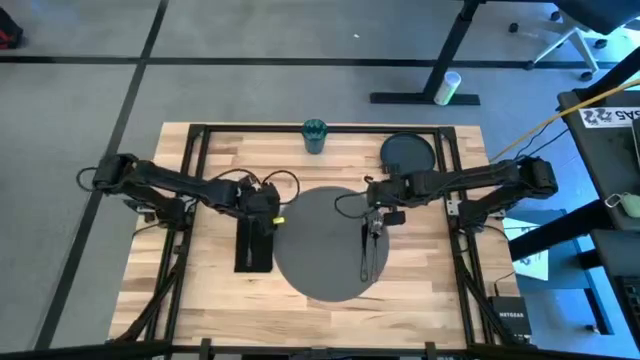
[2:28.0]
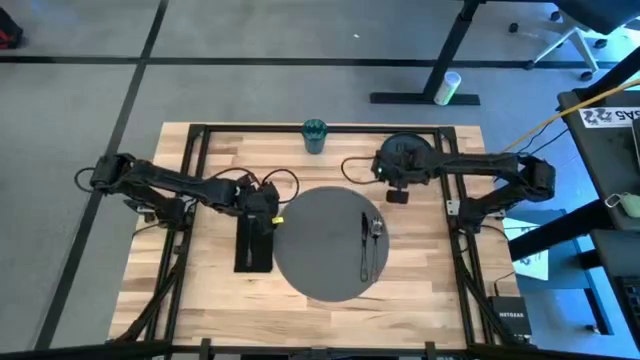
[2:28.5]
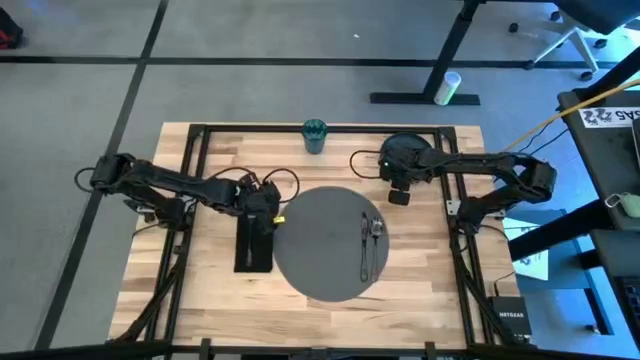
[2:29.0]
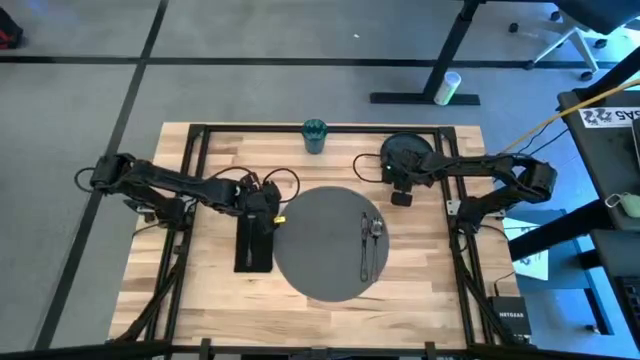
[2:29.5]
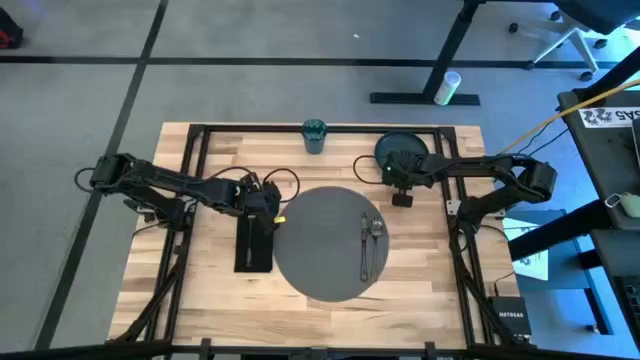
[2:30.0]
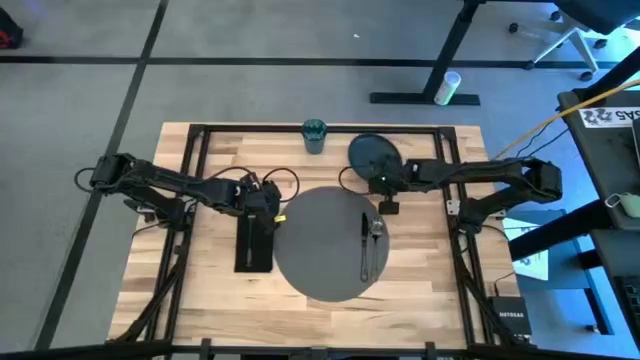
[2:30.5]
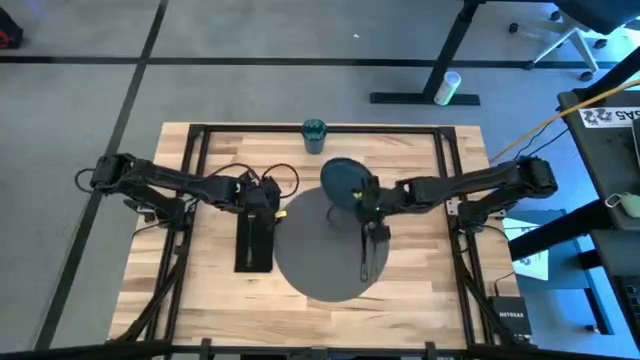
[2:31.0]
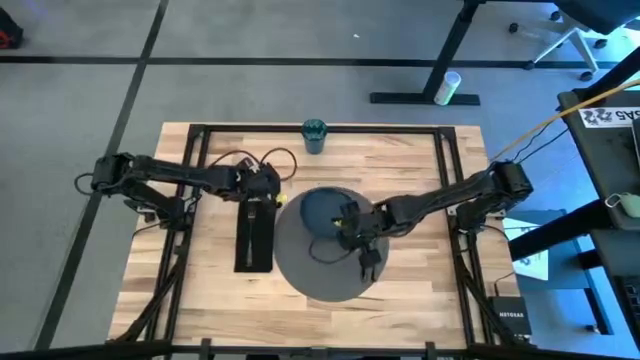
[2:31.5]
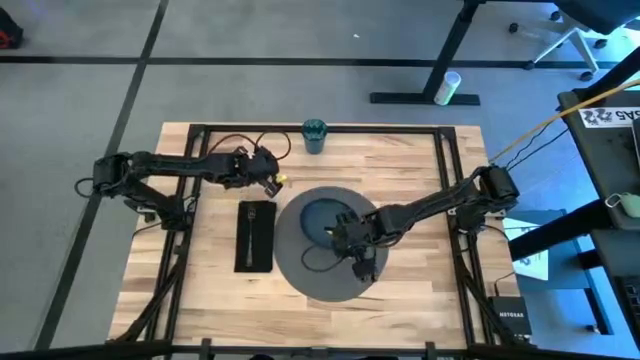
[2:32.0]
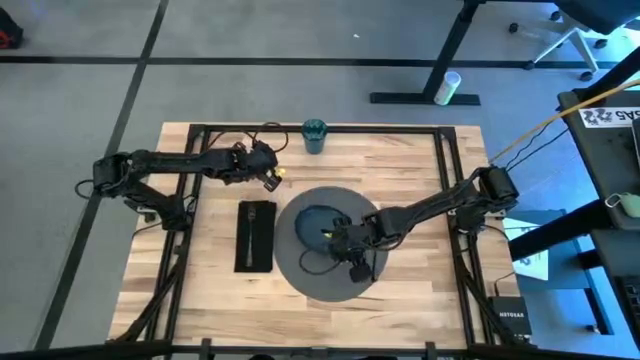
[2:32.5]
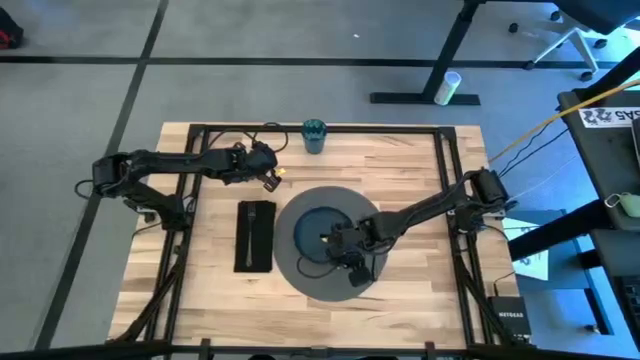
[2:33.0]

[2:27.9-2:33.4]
Task: Set table place
Put the black plate on the black table mat

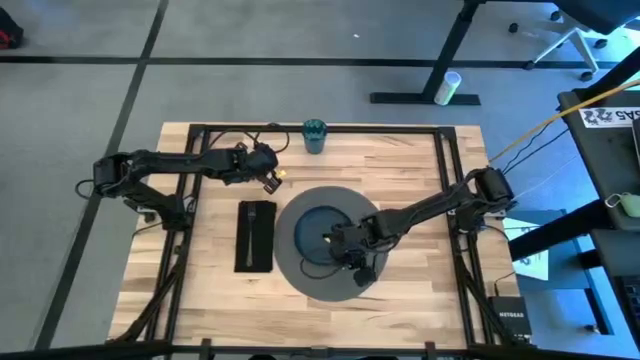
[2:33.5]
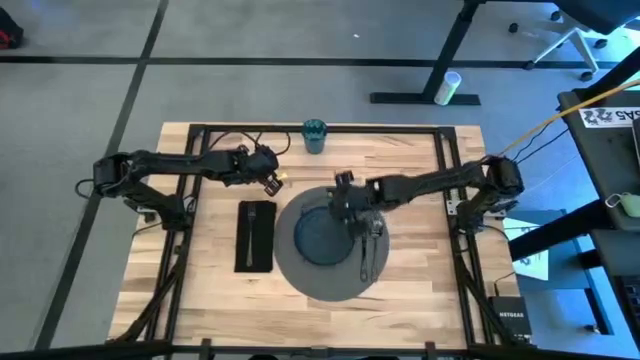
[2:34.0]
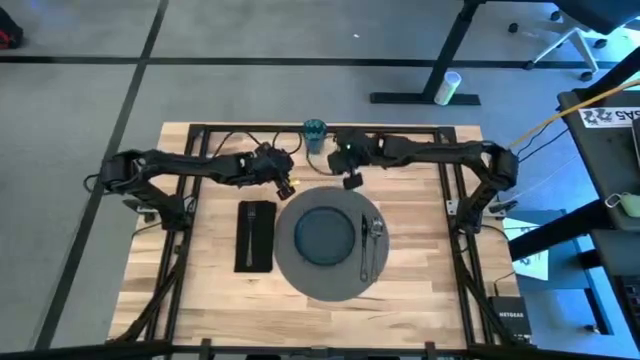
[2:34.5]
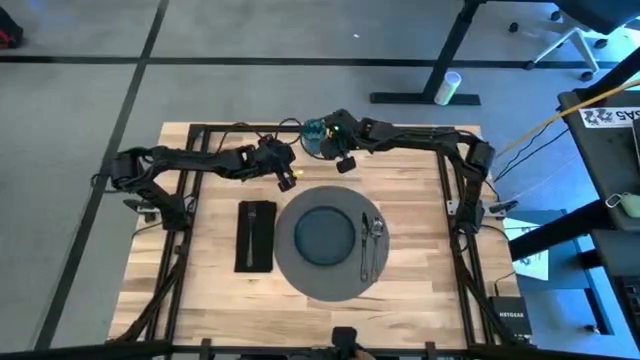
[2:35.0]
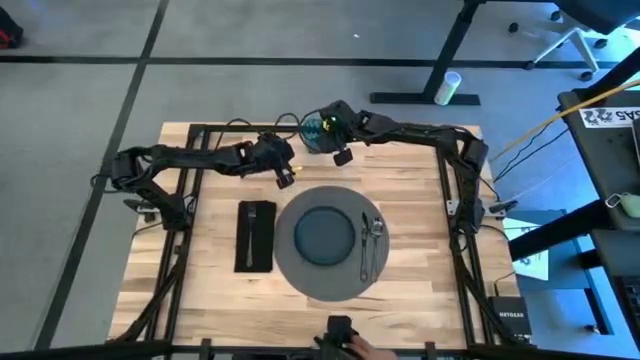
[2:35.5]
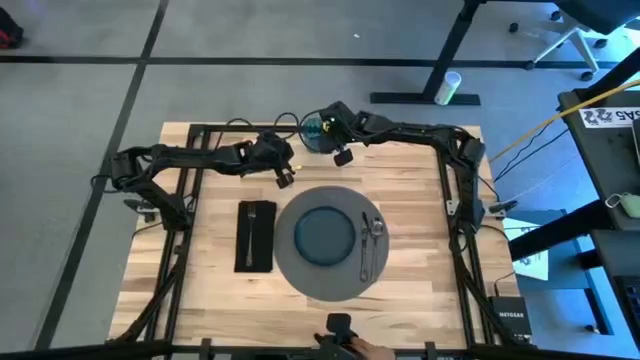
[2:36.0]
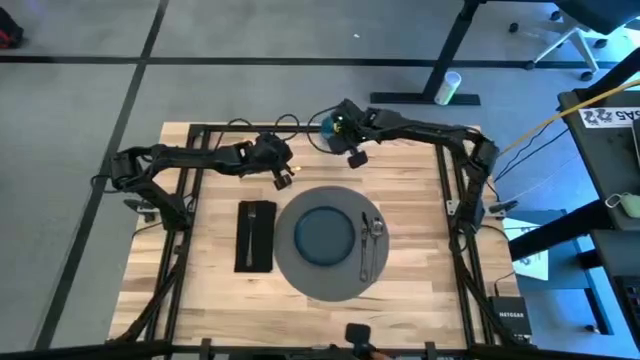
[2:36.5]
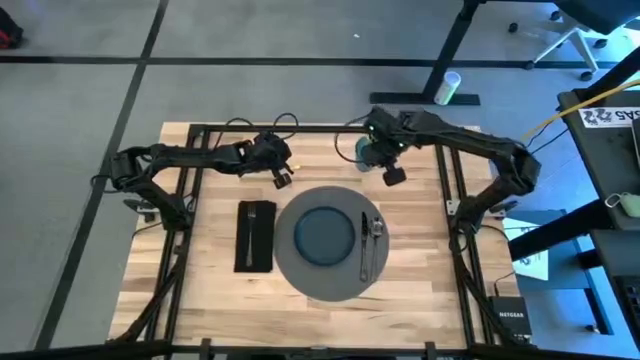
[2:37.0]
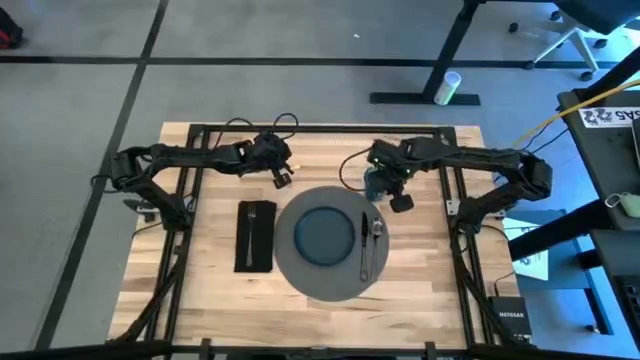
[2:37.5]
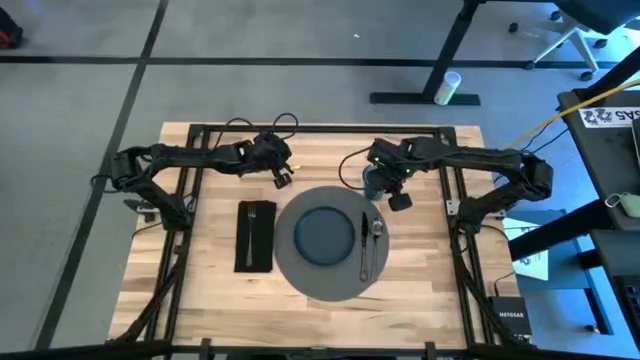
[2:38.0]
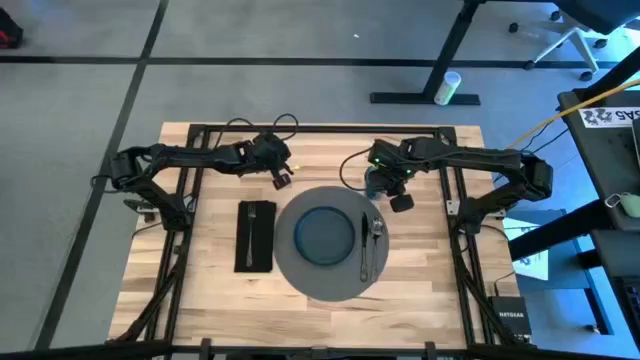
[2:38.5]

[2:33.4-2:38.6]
Put the blue cup to the top right of the table

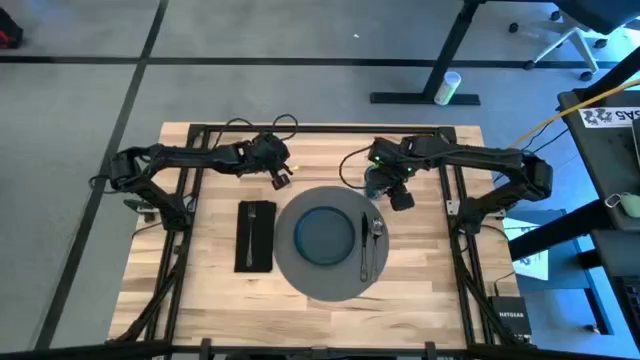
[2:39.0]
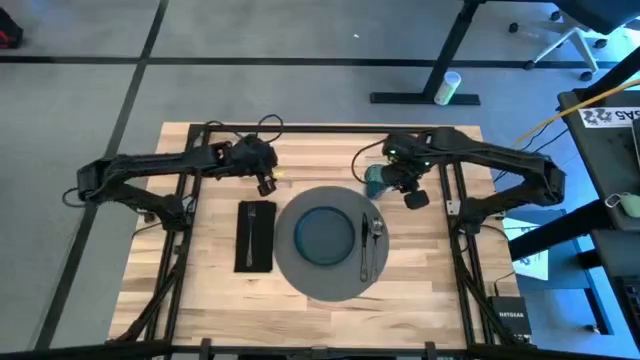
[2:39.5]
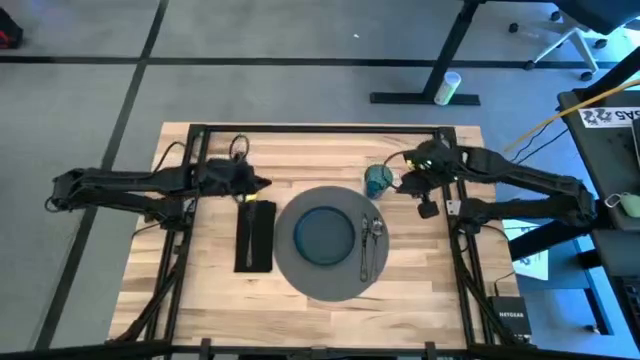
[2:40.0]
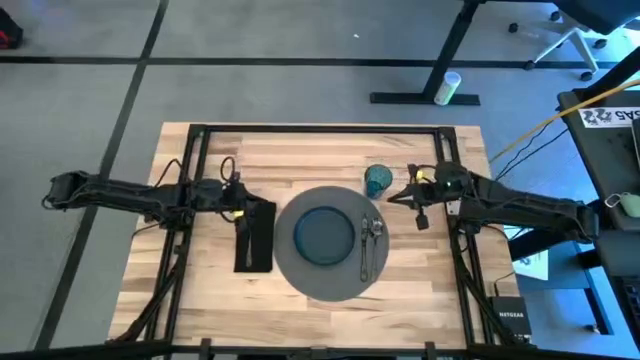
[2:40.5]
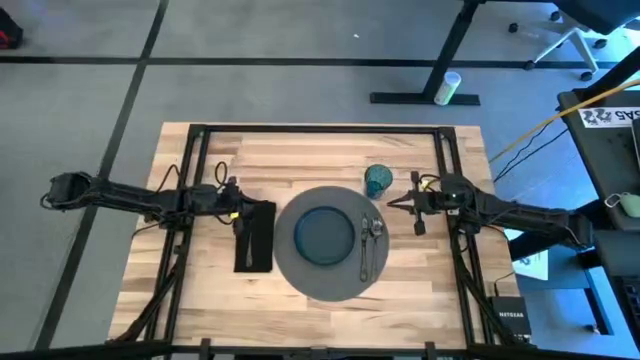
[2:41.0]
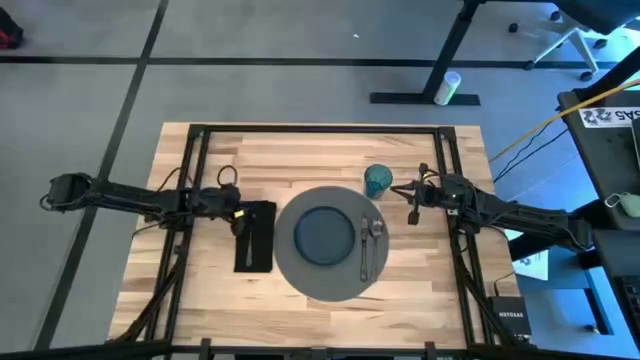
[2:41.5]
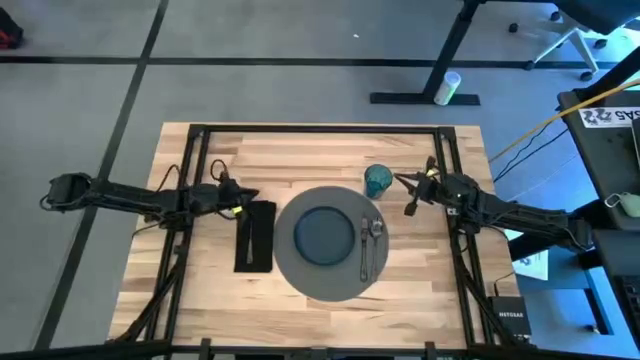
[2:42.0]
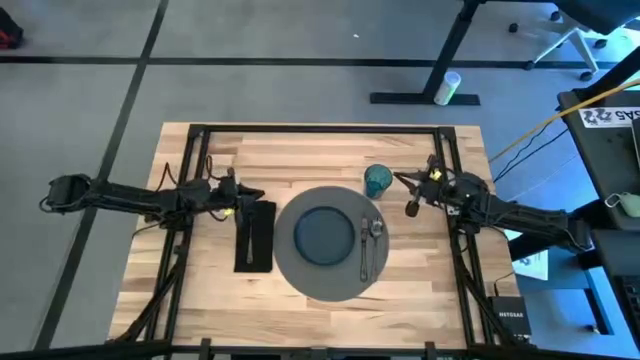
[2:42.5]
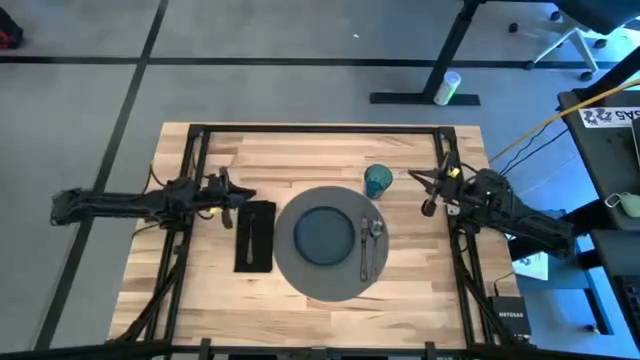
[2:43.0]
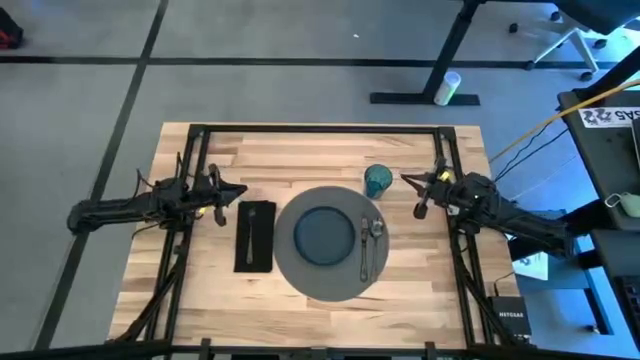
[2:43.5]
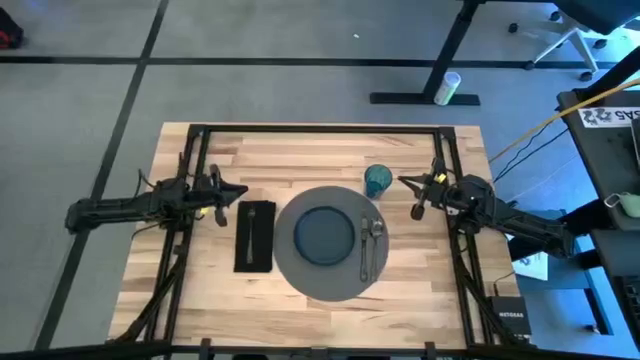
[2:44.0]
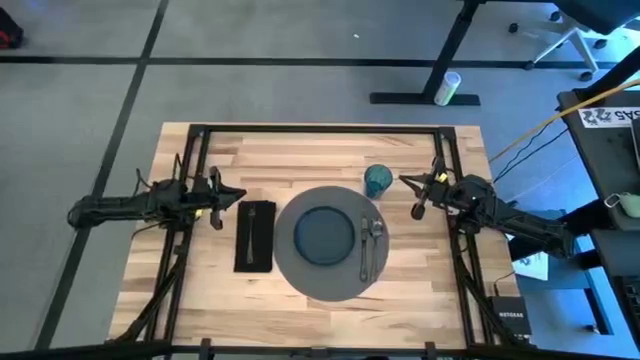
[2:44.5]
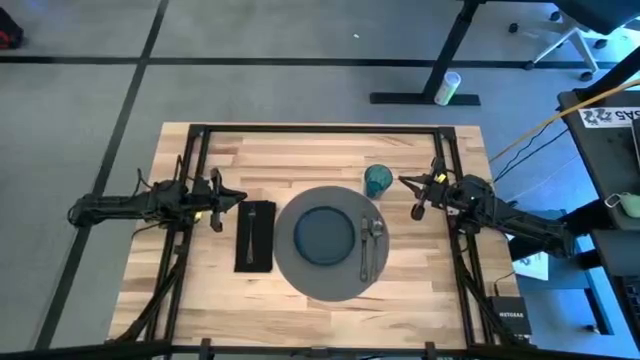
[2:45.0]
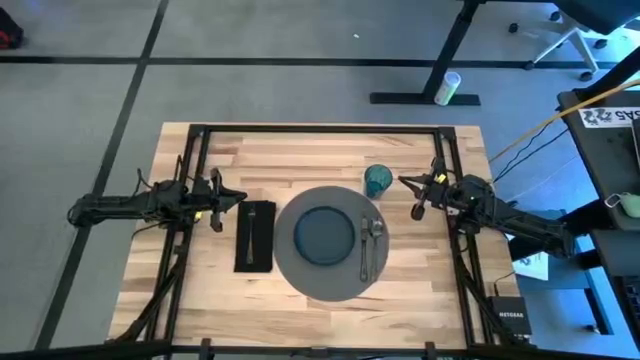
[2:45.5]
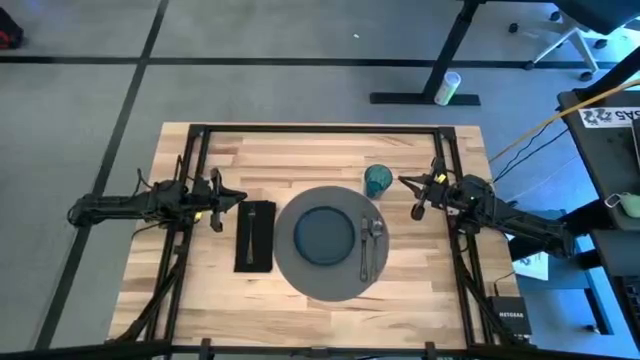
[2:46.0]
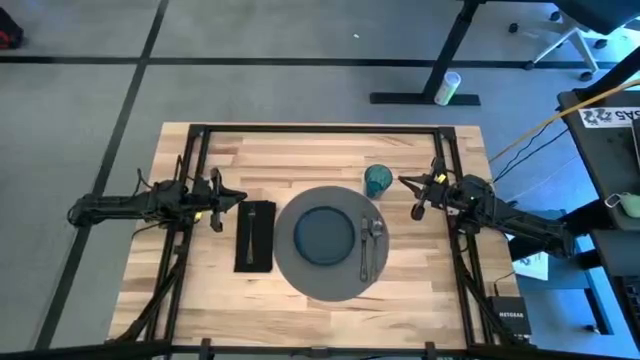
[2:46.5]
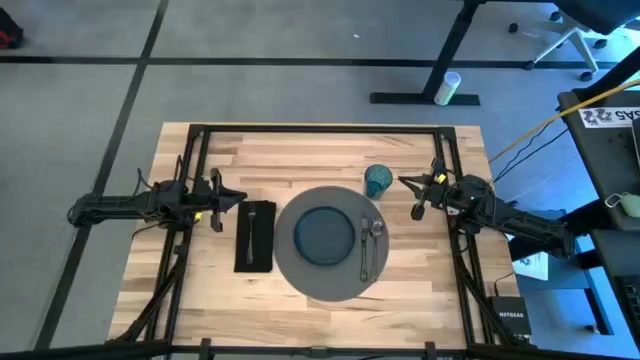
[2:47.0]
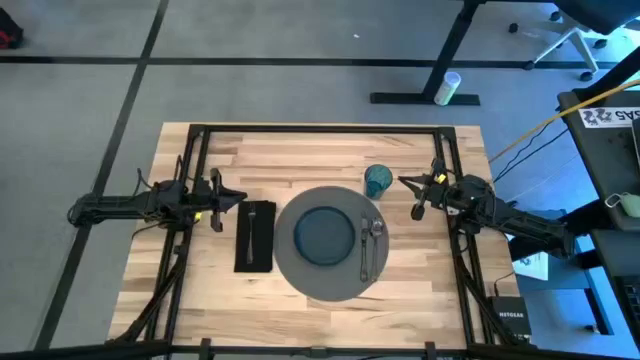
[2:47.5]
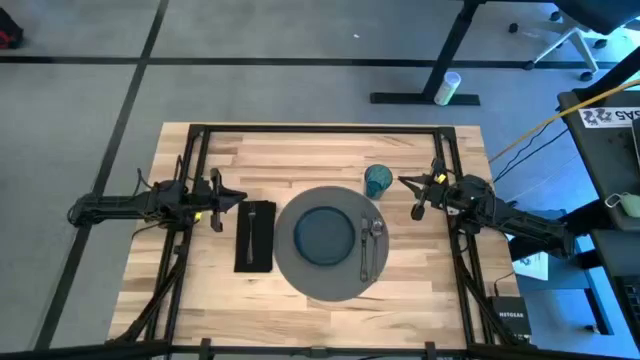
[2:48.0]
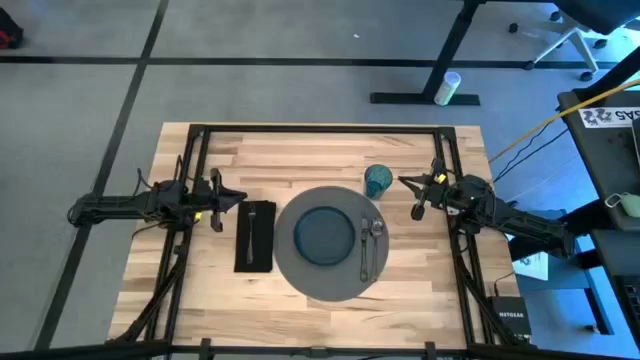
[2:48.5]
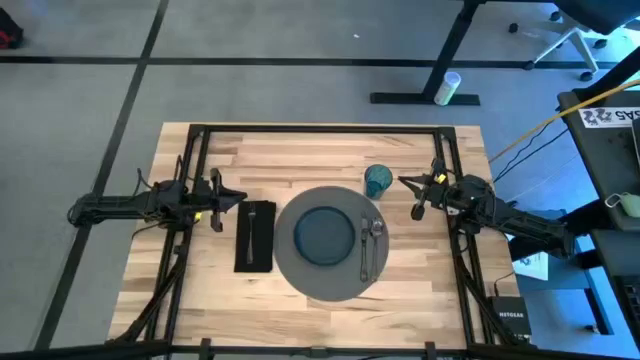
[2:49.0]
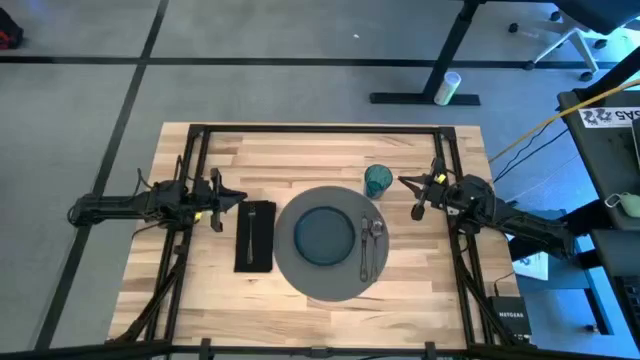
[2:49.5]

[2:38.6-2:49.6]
Return to Home Position
